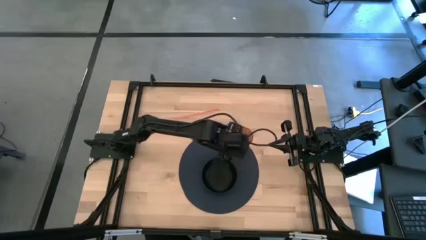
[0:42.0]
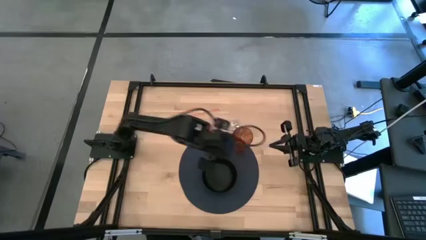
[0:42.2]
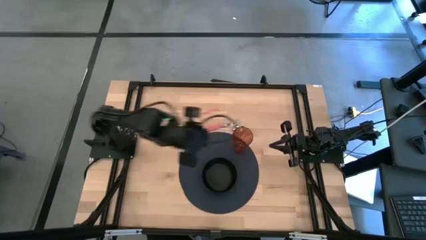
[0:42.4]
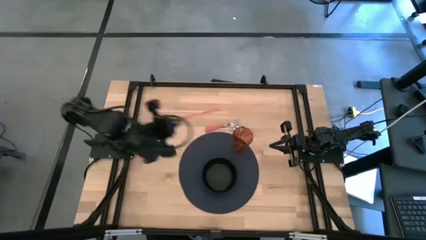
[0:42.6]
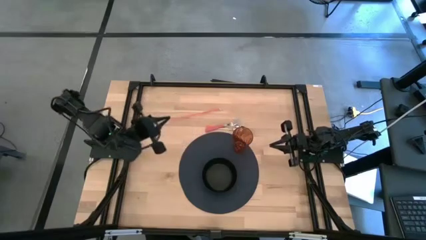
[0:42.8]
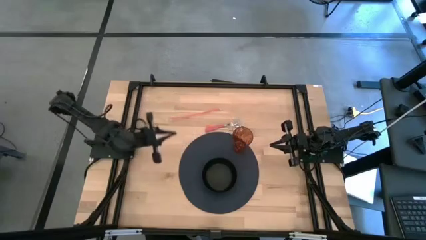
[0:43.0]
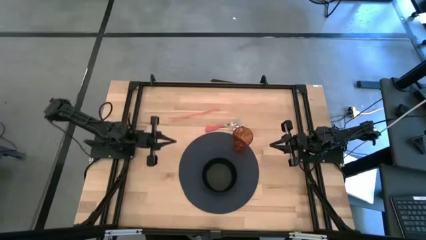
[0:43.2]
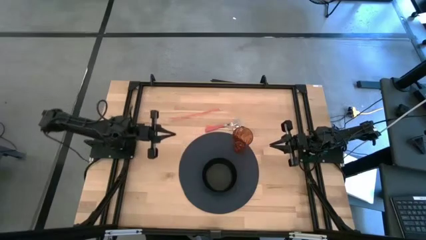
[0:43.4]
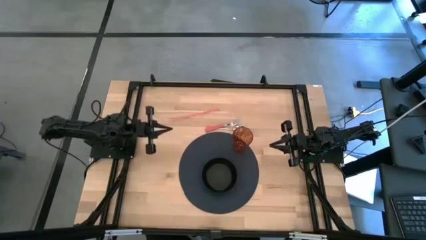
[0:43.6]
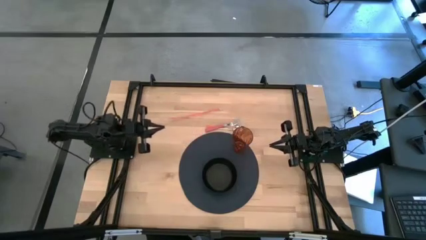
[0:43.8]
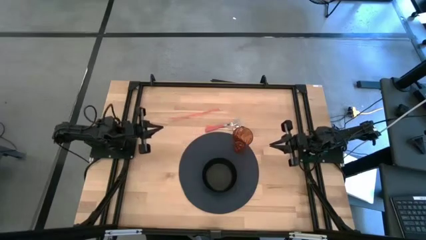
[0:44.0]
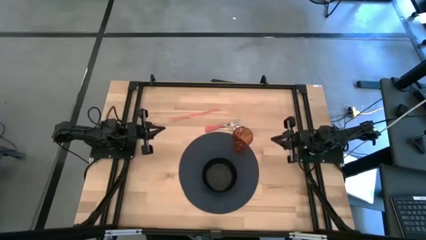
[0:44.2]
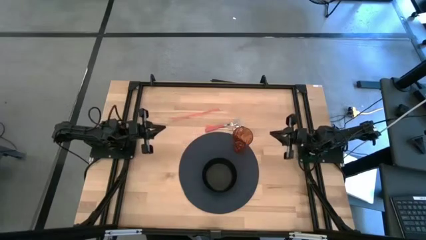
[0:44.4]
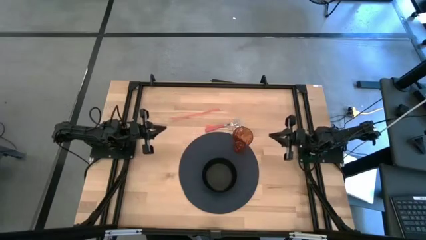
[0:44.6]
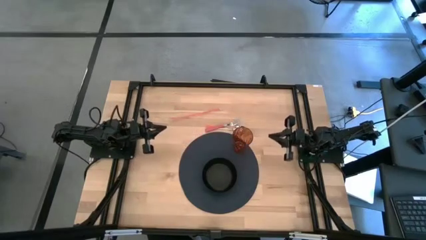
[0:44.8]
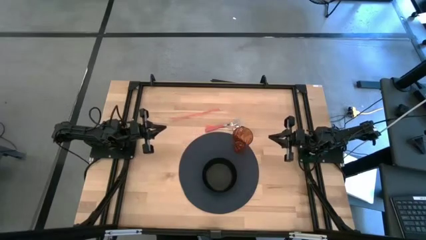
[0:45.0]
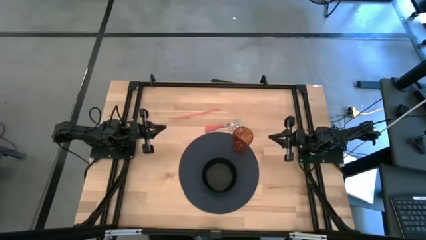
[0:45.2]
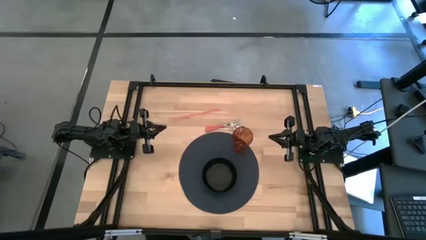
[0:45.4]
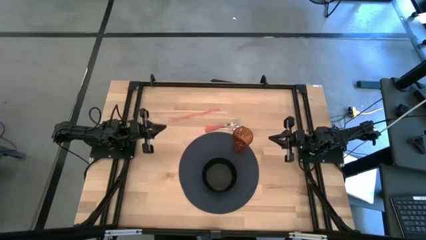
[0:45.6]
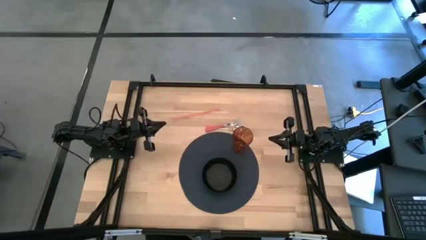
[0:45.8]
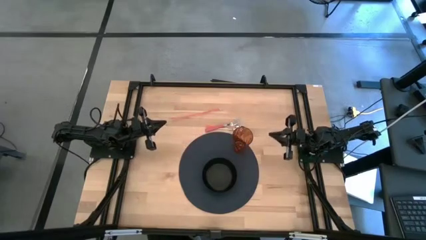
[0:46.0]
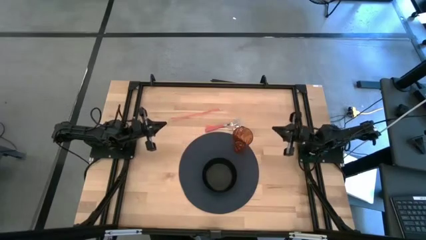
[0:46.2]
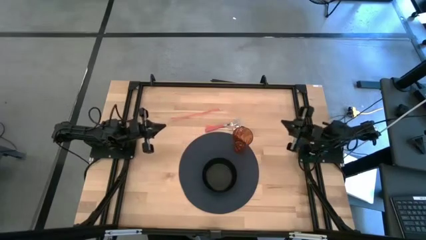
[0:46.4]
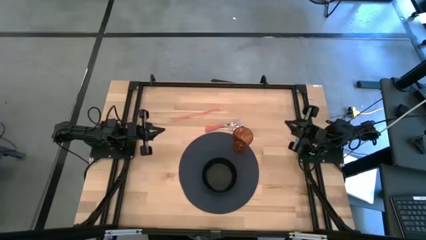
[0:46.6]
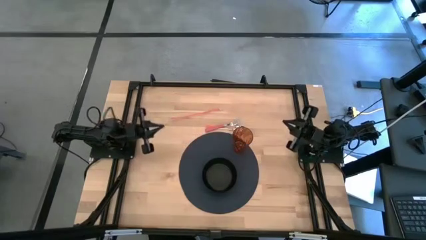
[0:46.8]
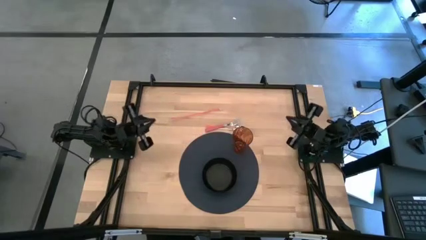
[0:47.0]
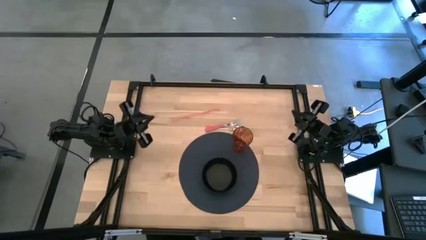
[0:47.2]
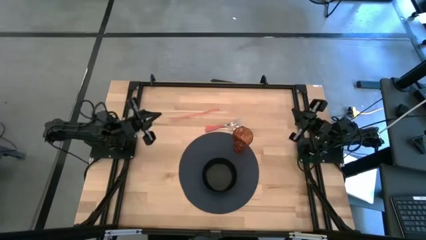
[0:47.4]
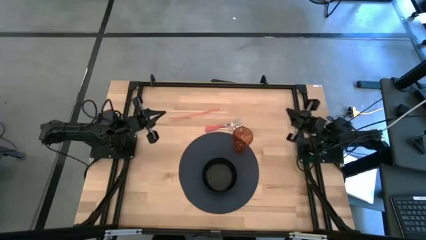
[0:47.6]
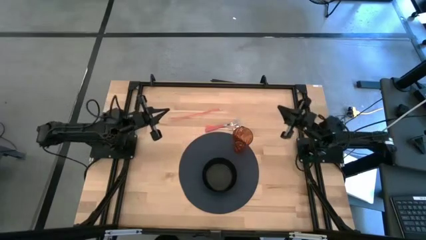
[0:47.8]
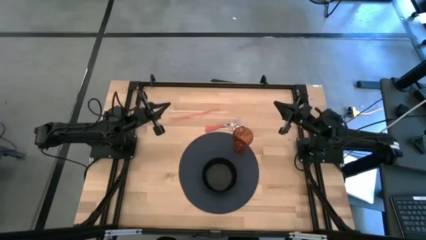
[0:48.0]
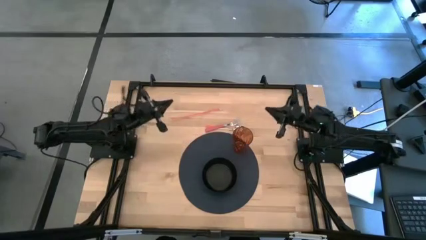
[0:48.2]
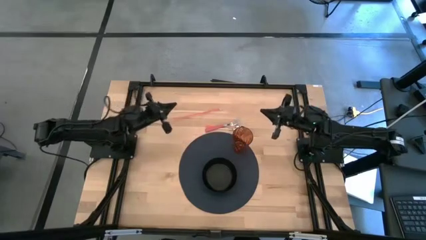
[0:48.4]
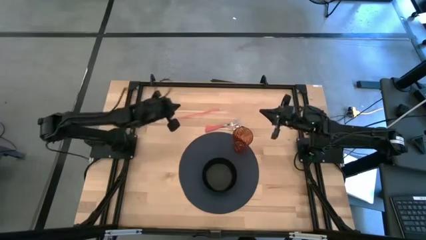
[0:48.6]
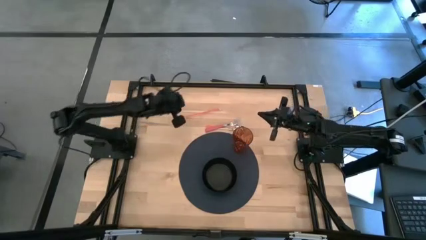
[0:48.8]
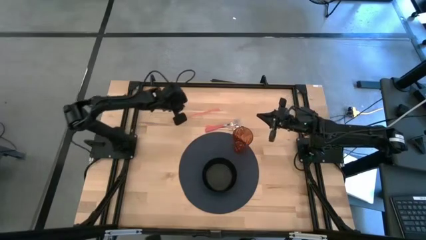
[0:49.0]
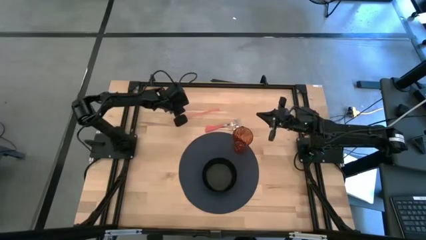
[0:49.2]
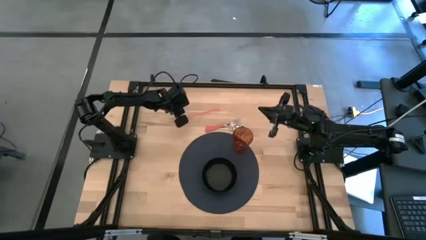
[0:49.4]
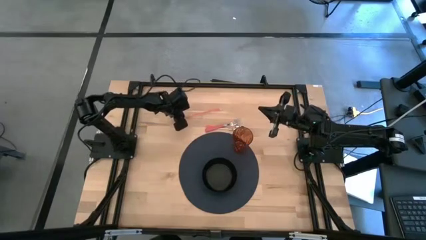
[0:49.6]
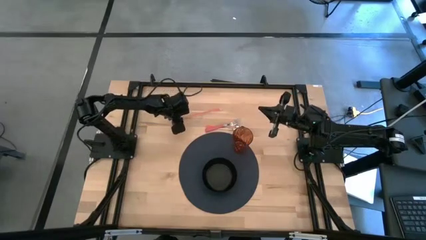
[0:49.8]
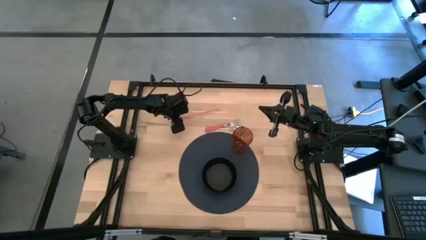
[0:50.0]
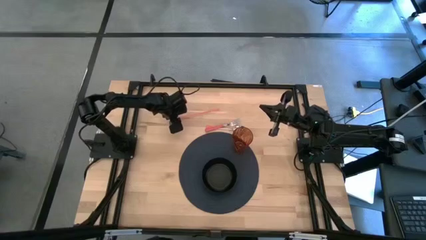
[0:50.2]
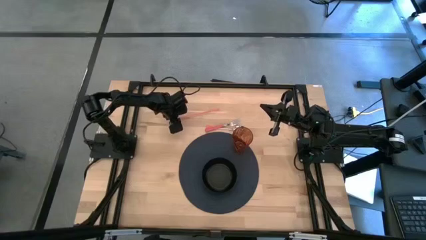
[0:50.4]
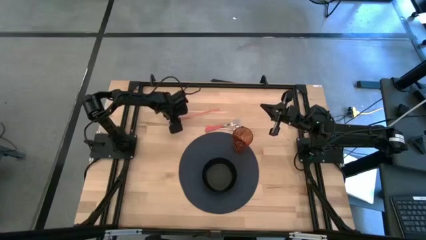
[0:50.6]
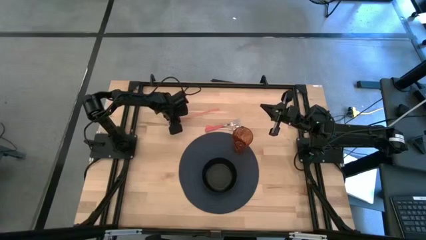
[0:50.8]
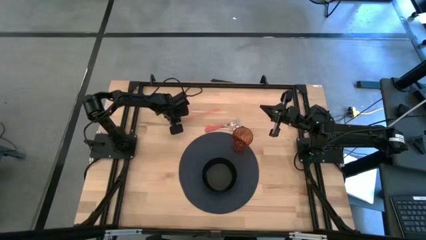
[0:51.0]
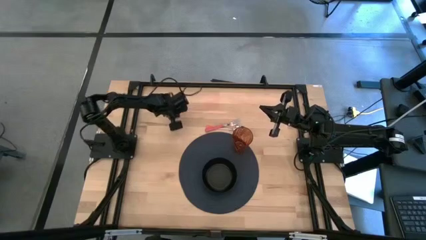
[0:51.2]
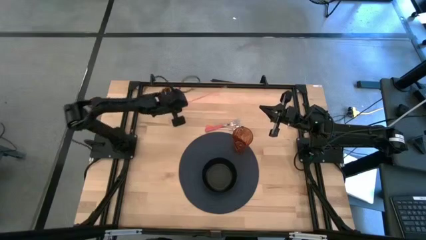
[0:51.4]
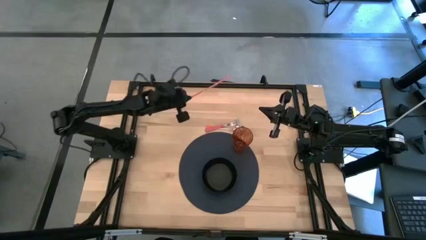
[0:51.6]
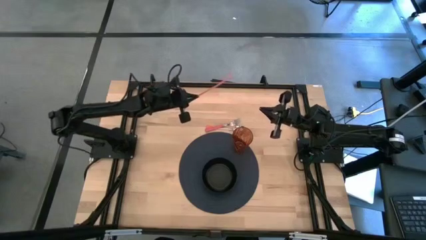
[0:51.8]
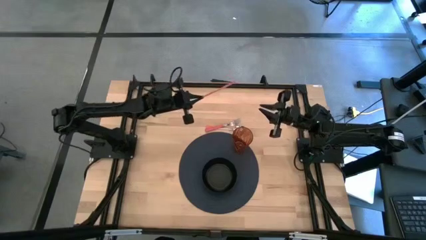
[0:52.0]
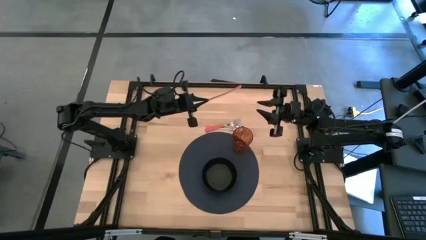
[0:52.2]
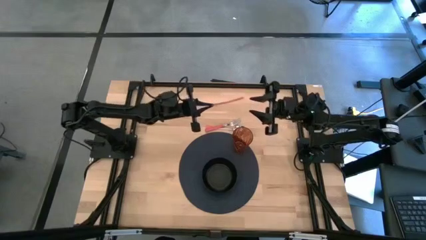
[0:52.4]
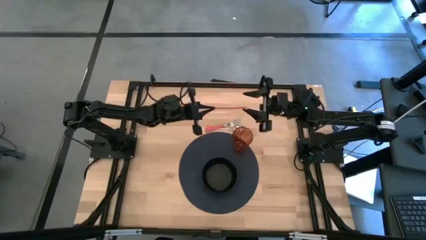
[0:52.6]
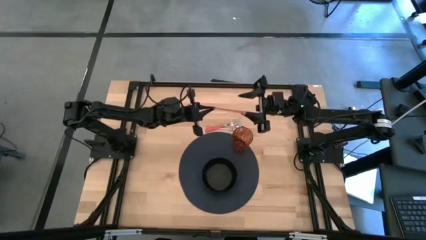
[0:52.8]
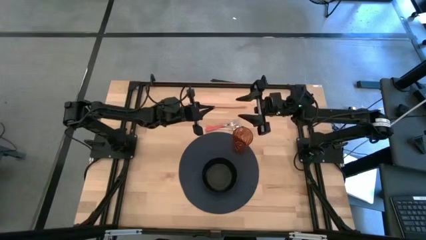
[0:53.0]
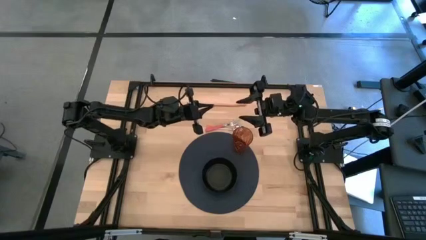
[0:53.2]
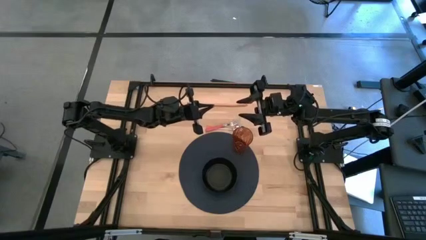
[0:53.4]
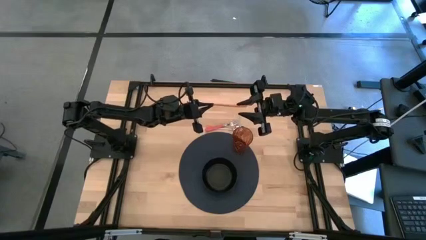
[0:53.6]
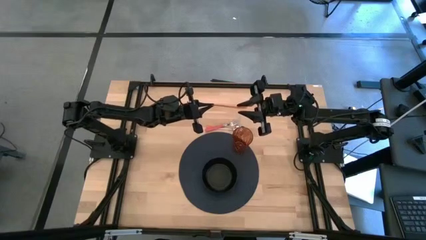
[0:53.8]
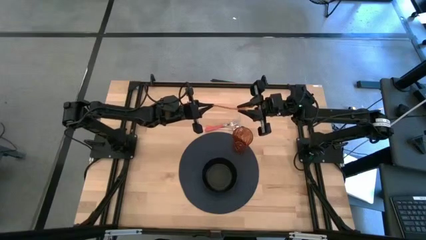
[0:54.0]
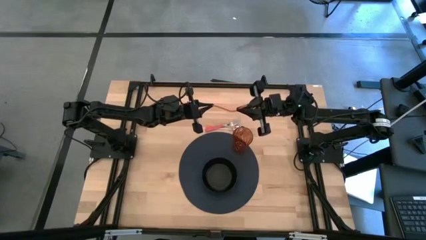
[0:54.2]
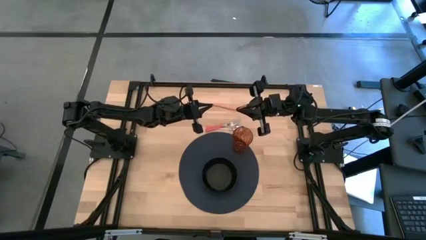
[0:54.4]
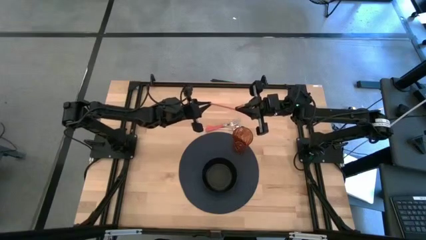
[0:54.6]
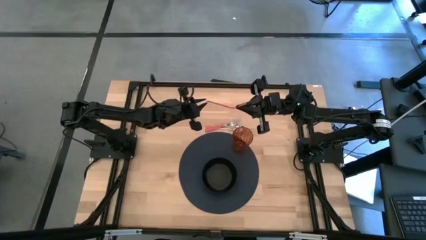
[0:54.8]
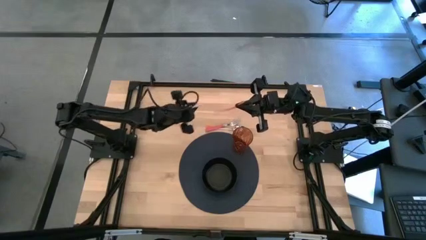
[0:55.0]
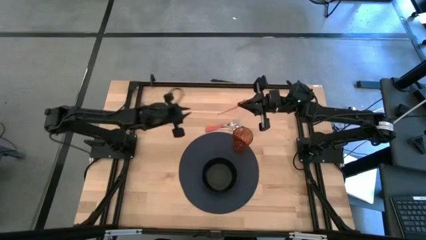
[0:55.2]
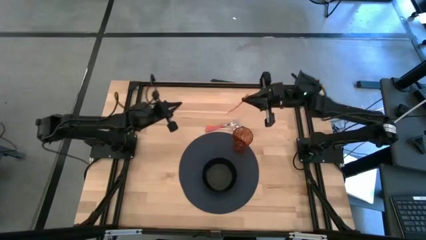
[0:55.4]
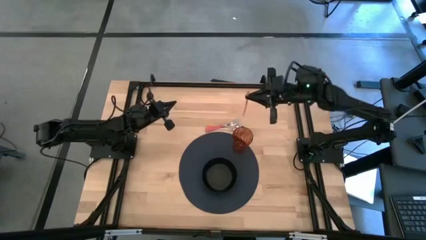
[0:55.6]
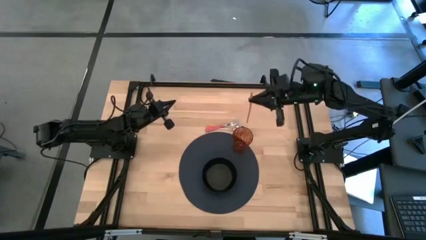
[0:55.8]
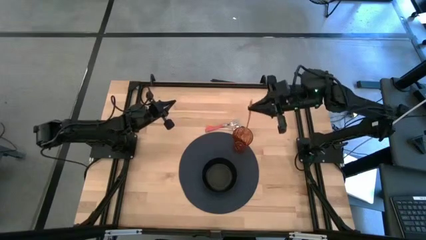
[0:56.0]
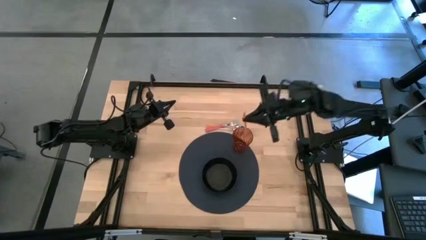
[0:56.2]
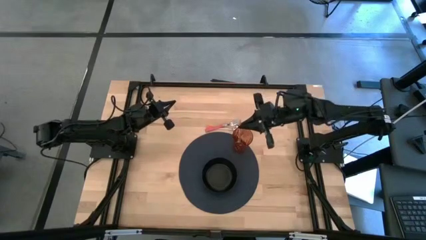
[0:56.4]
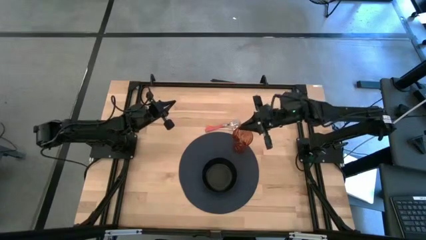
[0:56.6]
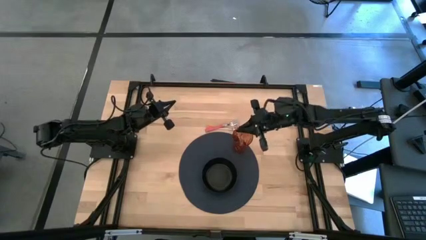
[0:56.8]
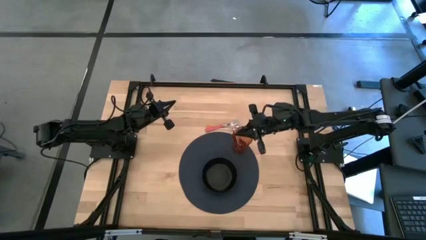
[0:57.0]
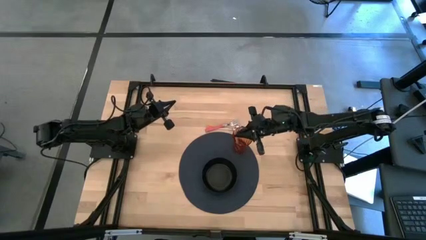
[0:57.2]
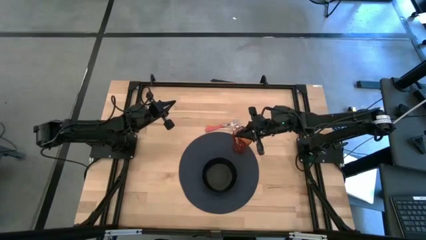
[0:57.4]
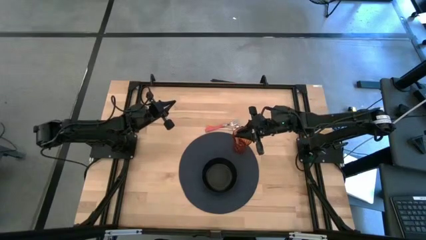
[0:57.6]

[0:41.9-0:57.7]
Task: Pick & Place Utensil
Put the pink straw into the red cup on the blue mat
